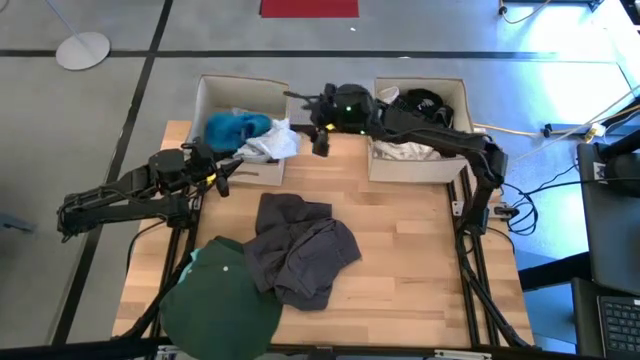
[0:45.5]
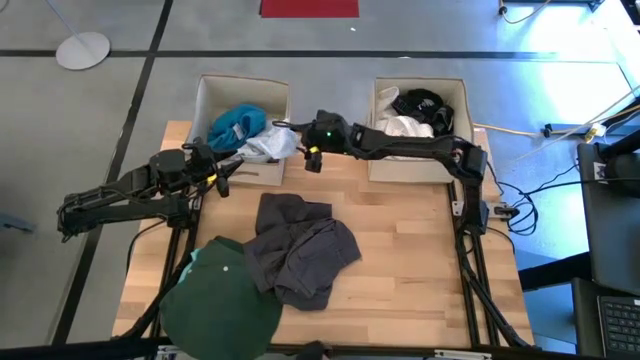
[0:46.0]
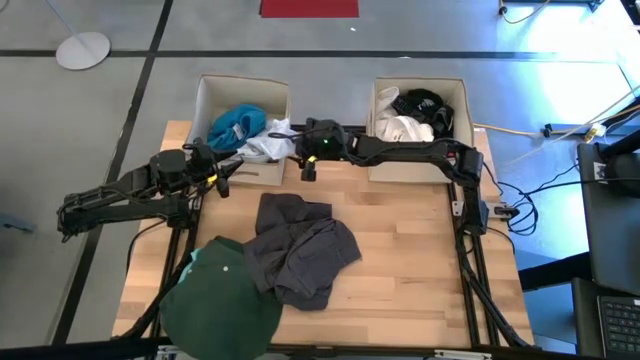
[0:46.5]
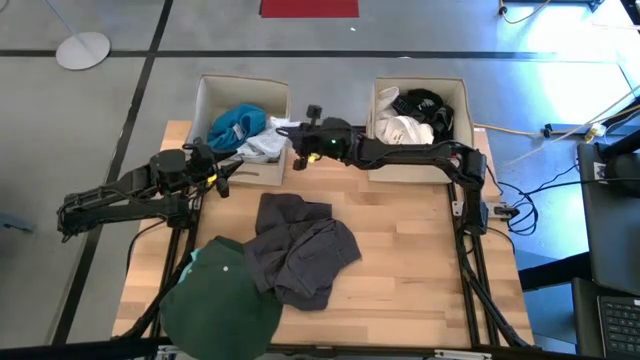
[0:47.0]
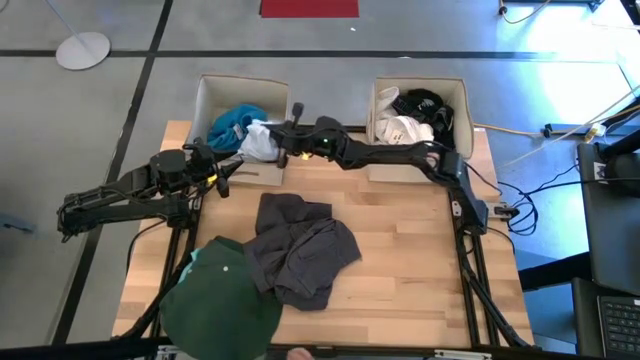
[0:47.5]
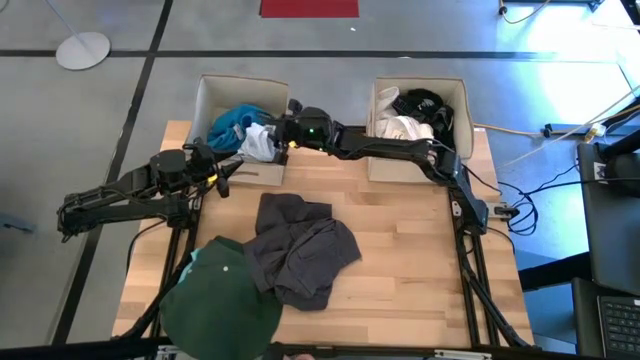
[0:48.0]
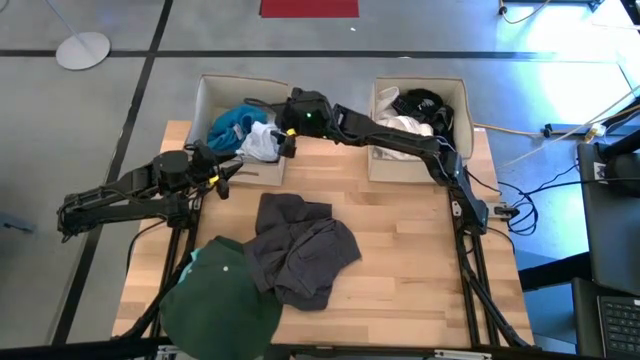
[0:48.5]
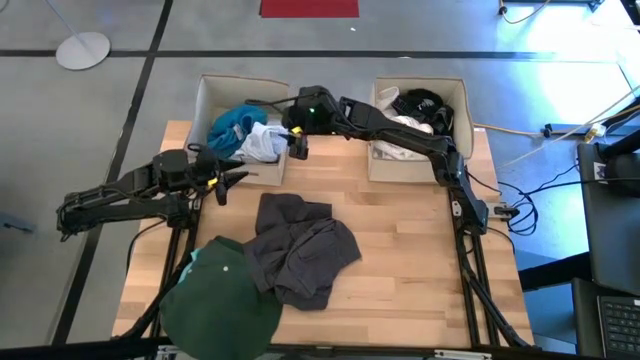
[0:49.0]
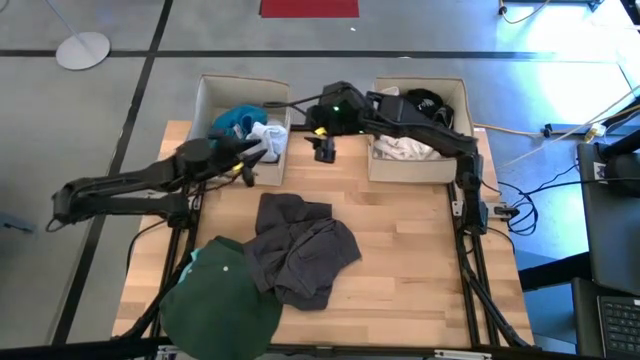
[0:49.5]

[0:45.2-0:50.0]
Task: Sort clothes
Adjust the patterned white dress in the laundry bin

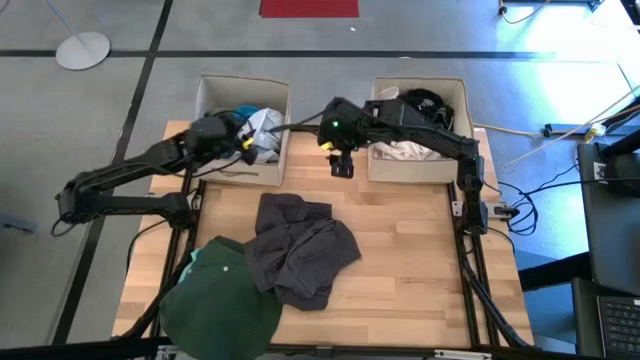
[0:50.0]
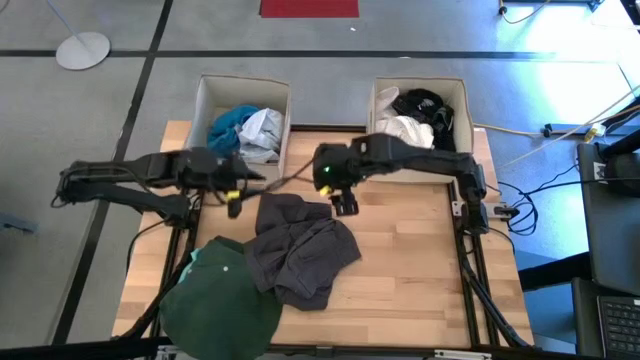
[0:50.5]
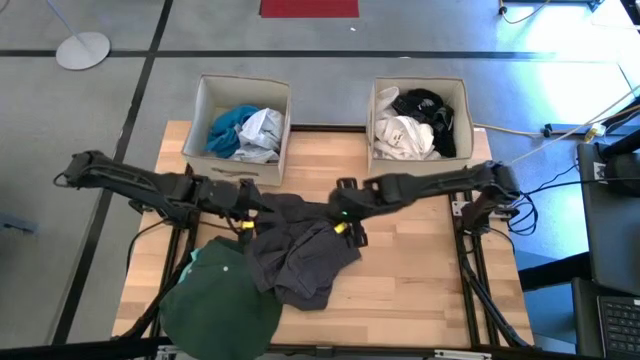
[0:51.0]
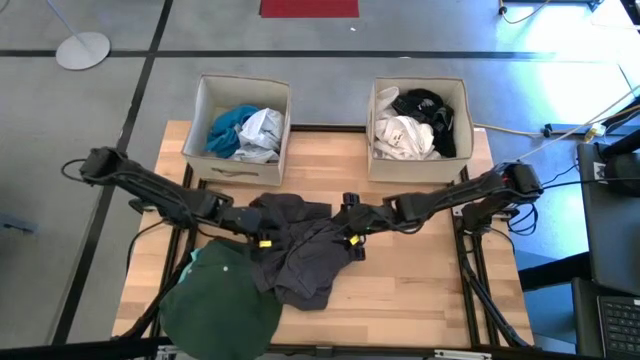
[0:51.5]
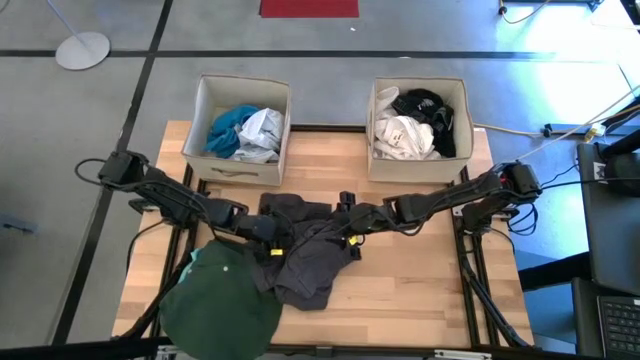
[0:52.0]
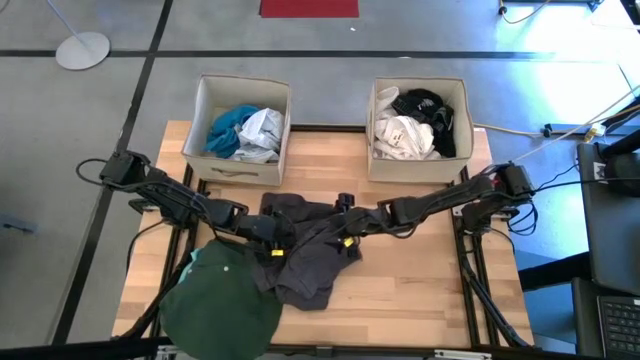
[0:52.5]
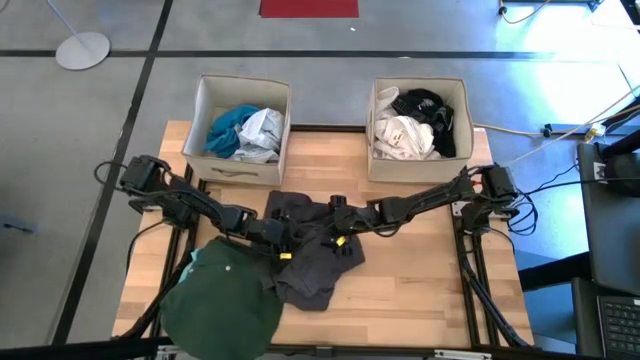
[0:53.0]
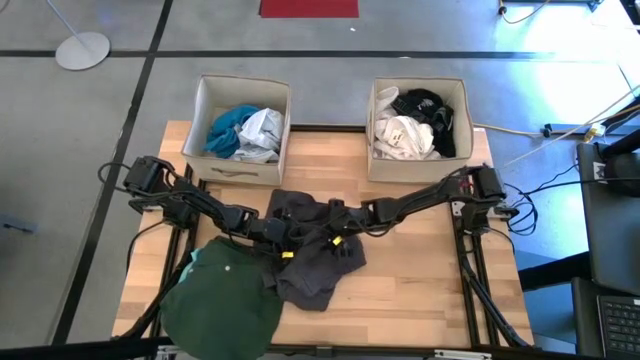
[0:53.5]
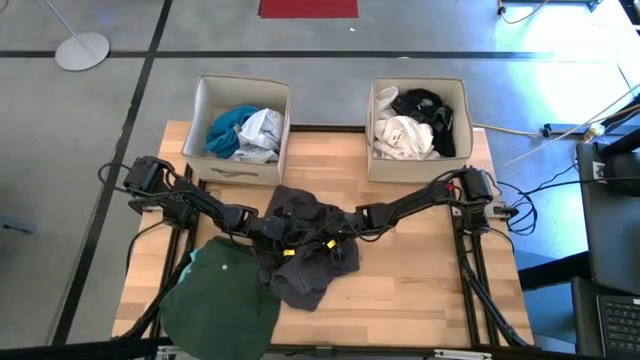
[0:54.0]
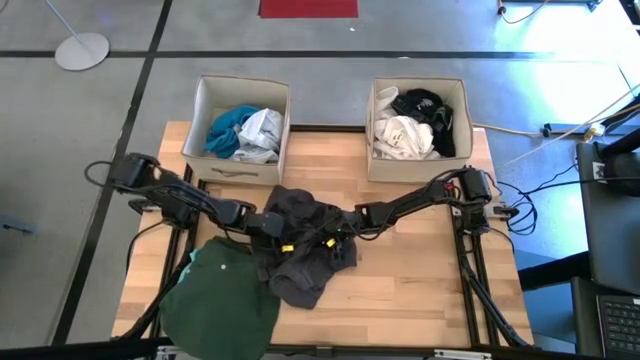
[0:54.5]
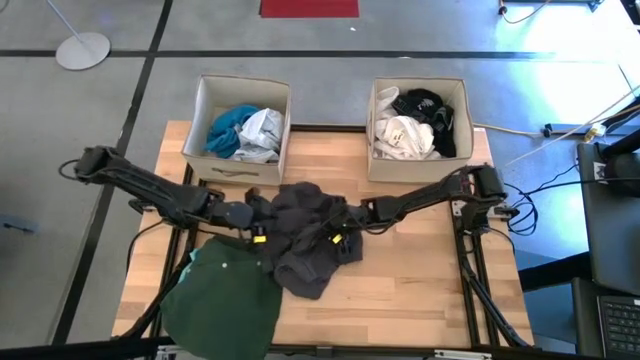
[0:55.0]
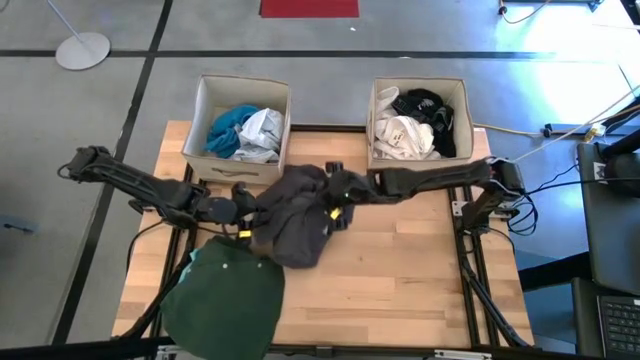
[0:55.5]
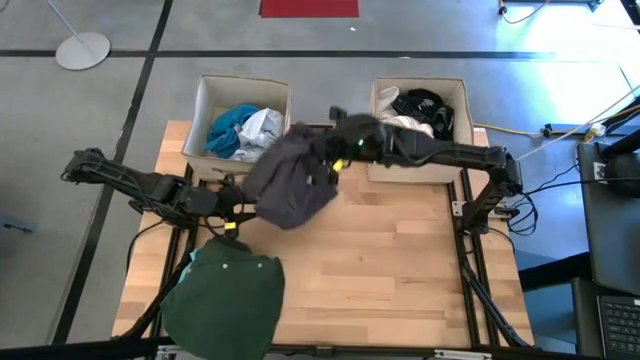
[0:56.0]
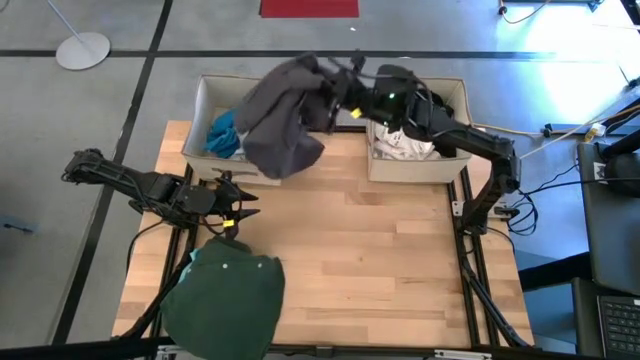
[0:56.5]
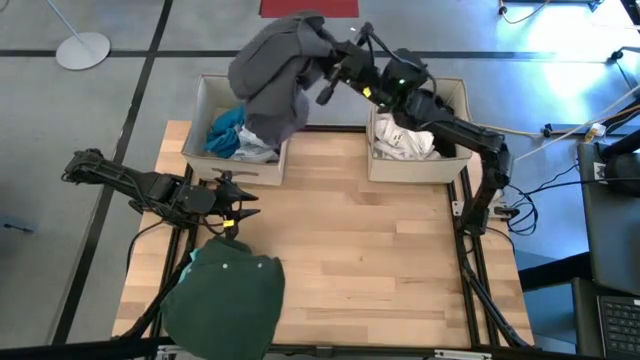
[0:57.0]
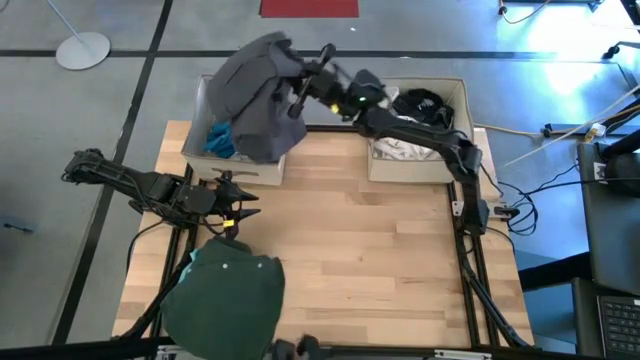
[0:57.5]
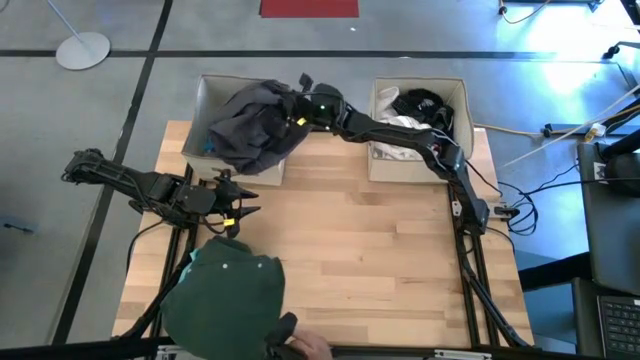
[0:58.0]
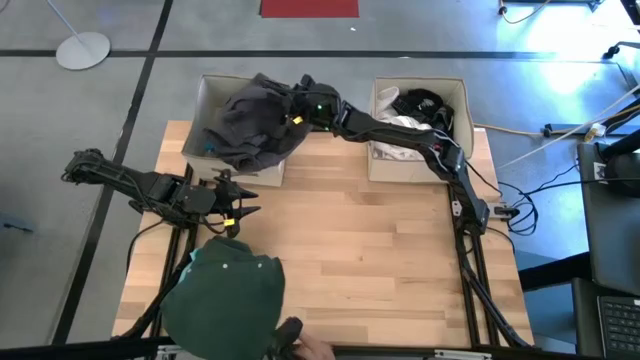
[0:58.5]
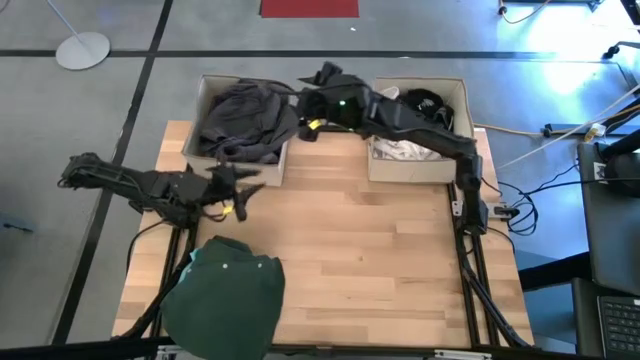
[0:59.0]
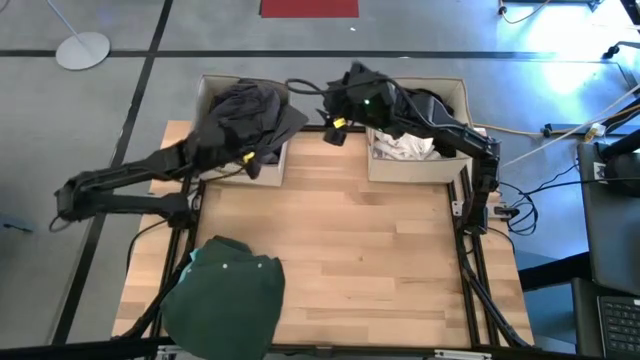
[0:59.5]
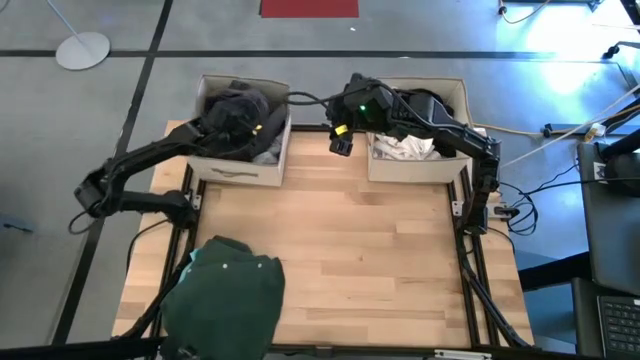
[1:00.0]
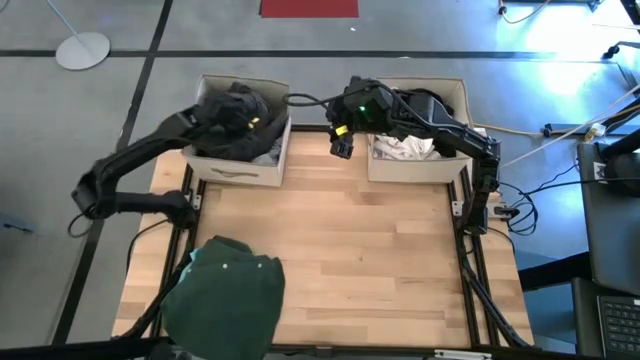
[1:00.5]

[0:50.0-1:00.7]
Put the gray shorts into the left laundry bin

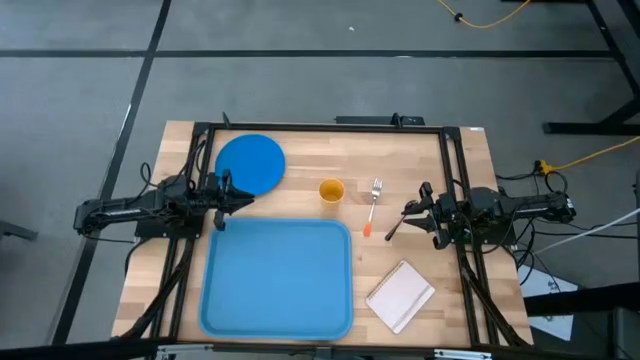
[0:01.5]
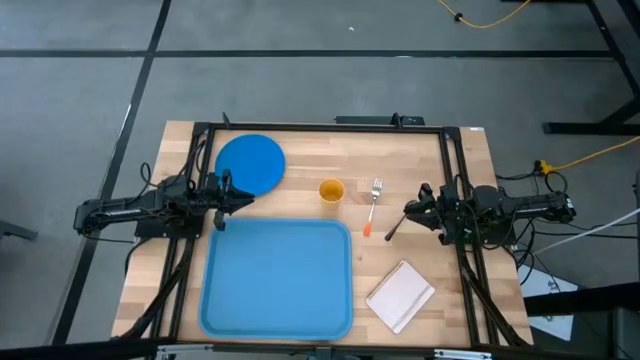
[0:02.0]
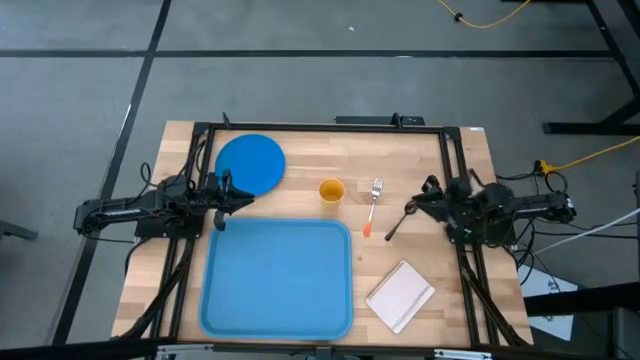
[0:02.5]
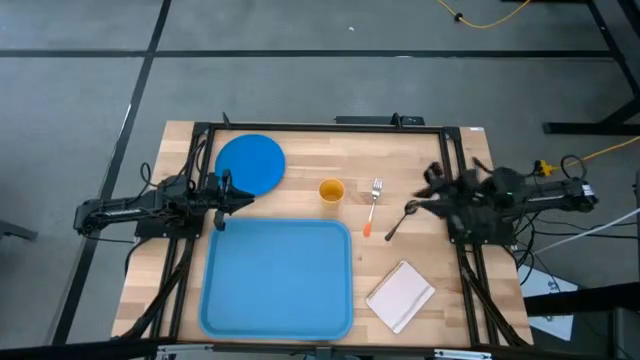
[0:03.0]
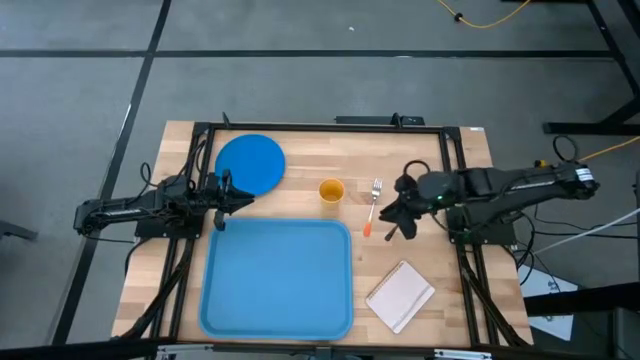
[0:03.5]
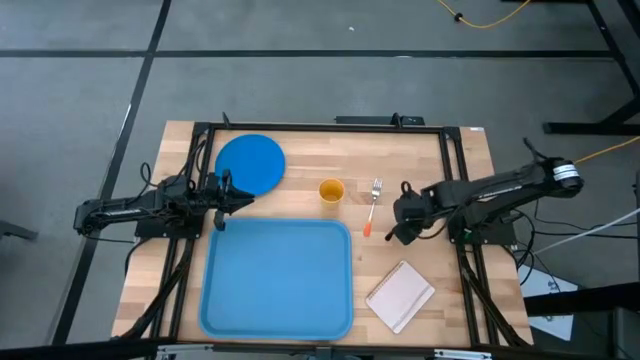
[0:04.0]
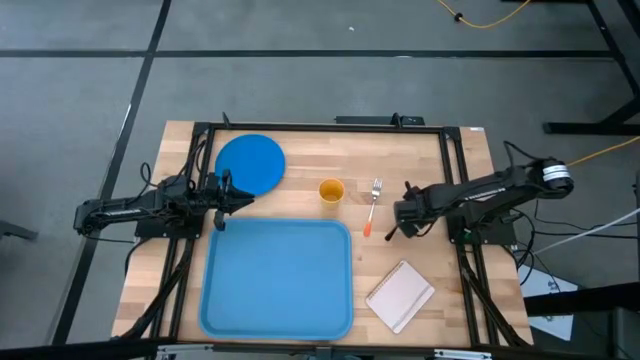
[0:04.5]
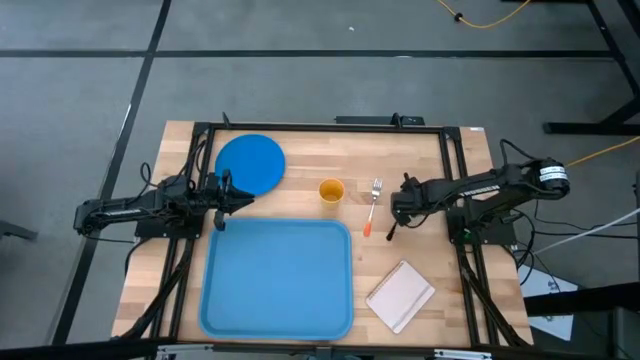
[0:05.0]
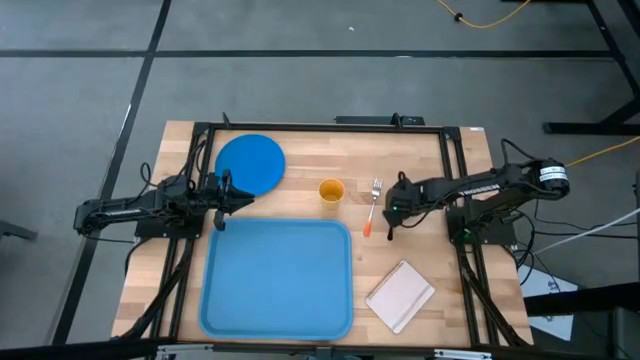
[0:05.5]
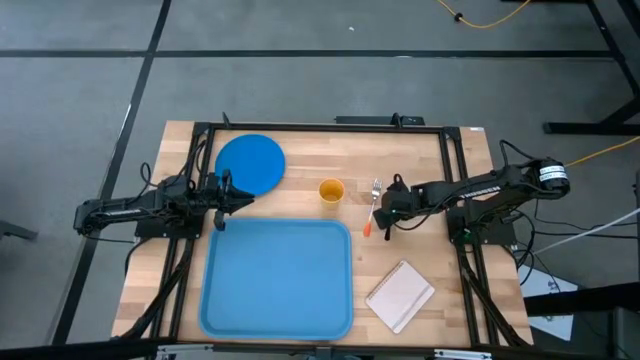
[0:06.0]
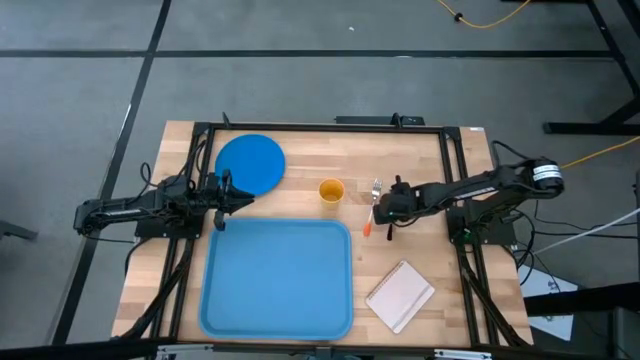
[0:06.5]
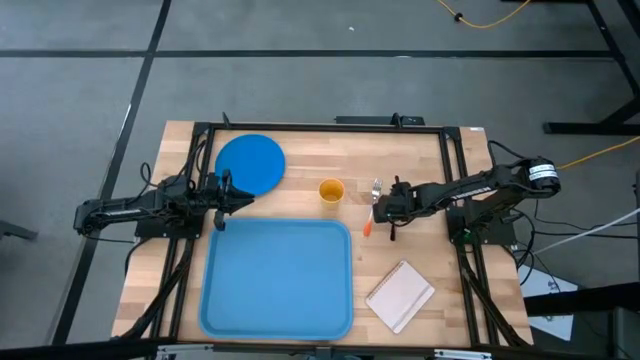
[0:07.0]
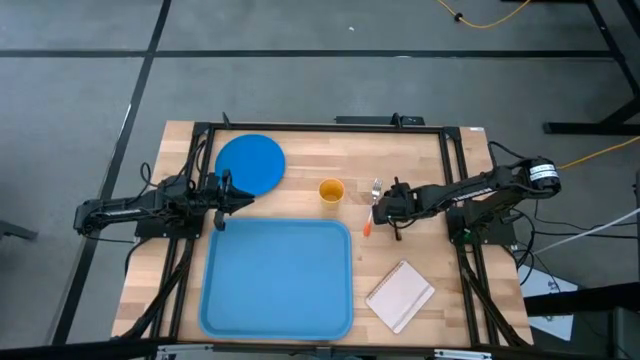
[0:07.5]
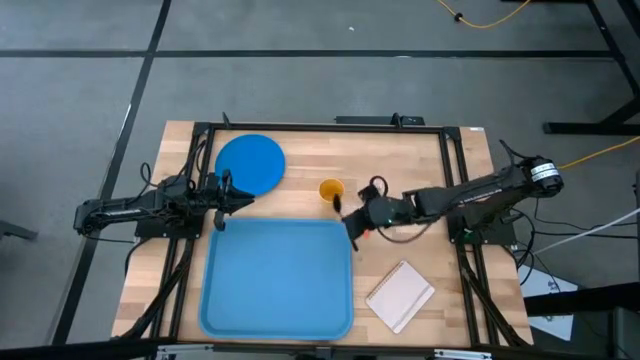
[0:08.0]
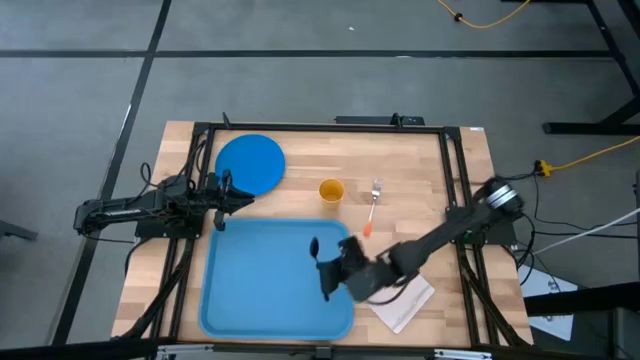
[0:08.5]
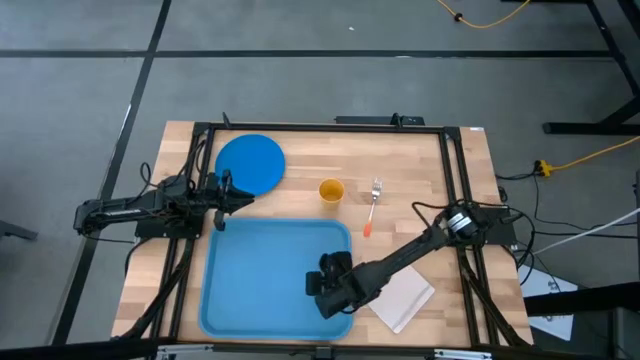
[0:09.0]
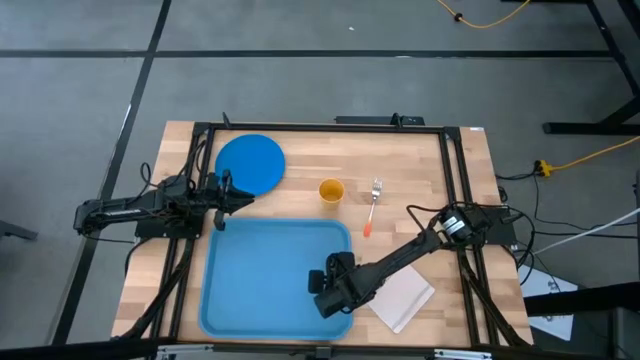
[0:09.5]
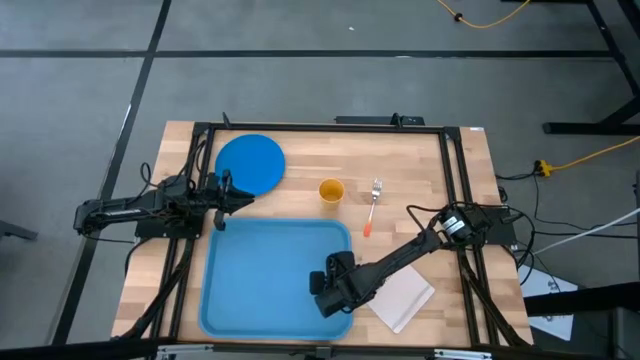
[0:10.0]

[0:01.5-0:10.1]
Task: Pick and place plate/cup/fork/spoon on tray
Put the black spoon on the blue tray
